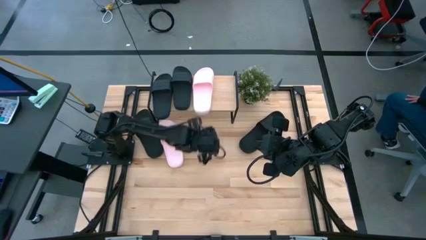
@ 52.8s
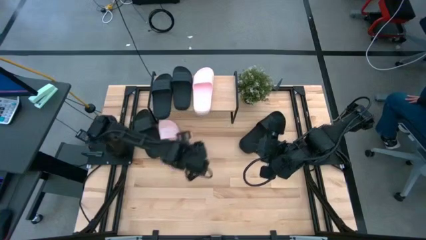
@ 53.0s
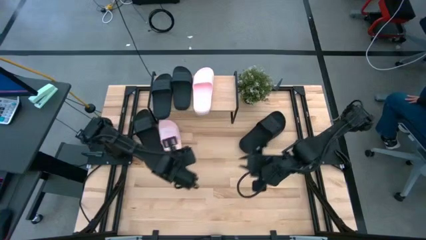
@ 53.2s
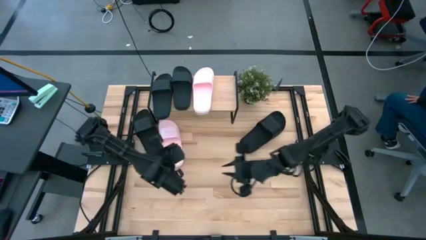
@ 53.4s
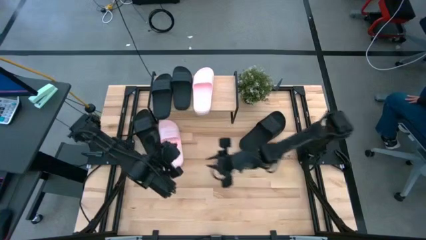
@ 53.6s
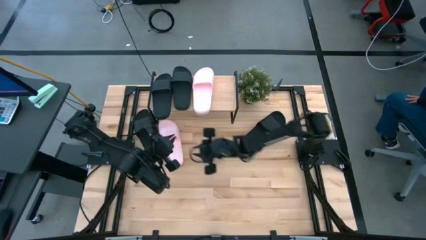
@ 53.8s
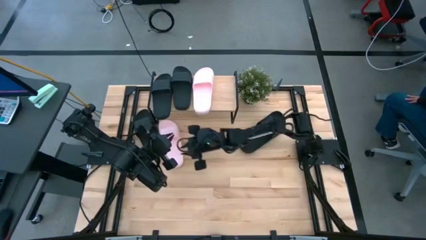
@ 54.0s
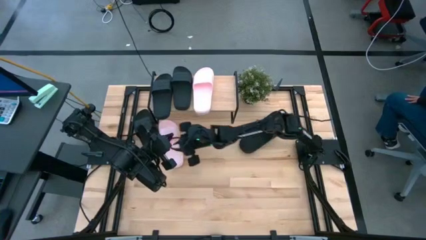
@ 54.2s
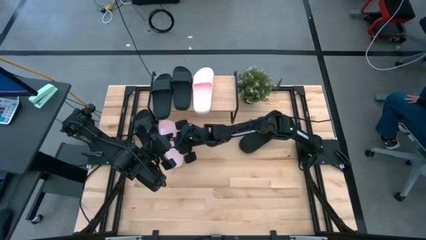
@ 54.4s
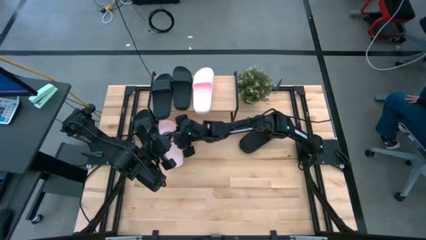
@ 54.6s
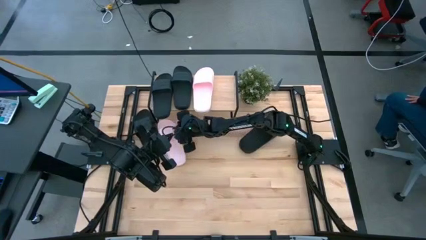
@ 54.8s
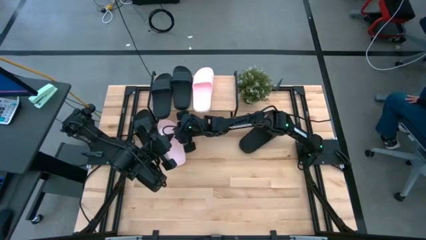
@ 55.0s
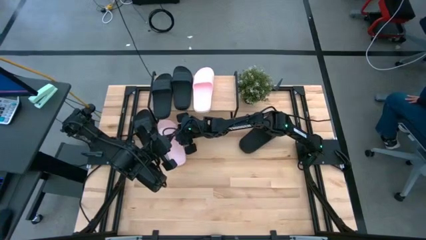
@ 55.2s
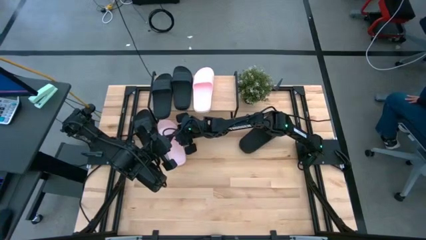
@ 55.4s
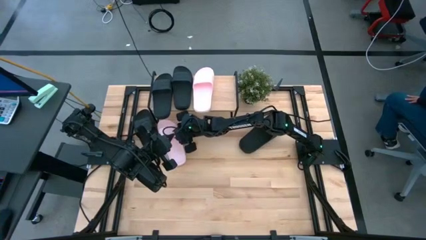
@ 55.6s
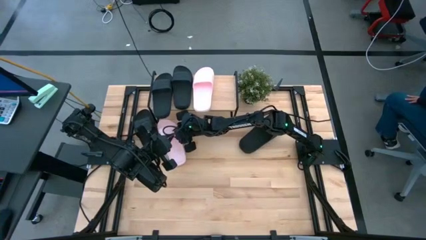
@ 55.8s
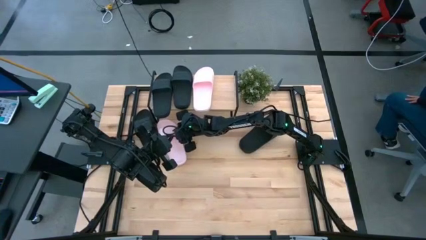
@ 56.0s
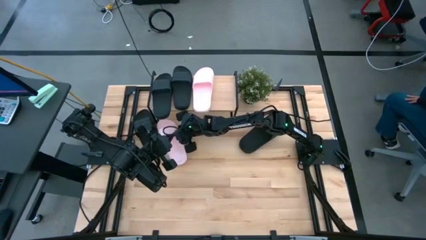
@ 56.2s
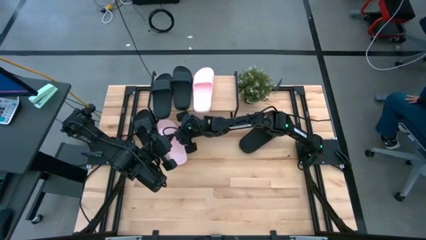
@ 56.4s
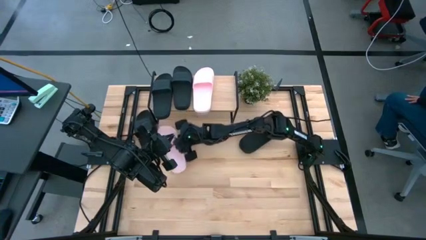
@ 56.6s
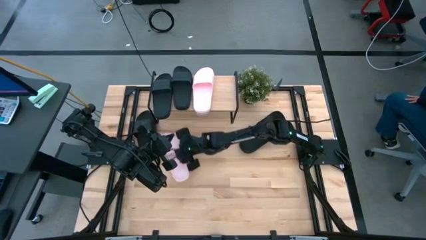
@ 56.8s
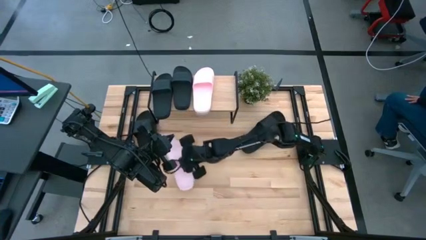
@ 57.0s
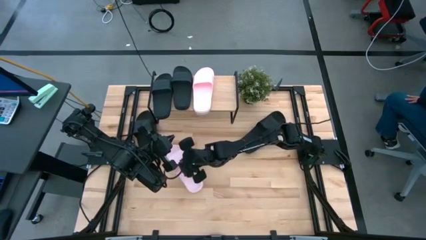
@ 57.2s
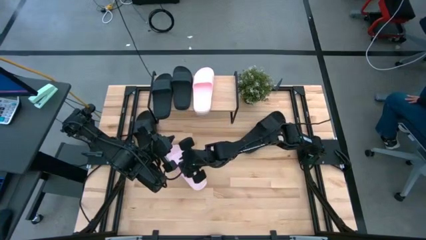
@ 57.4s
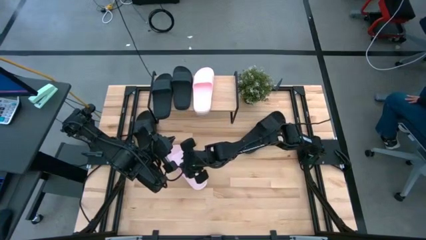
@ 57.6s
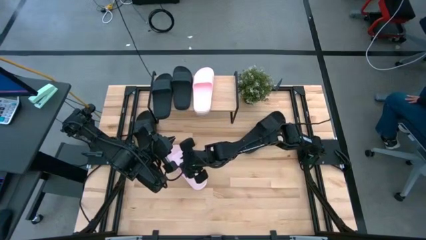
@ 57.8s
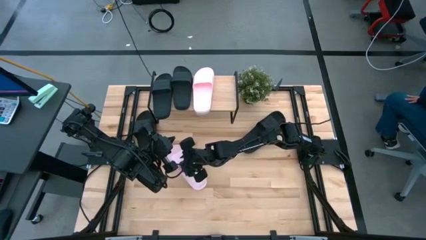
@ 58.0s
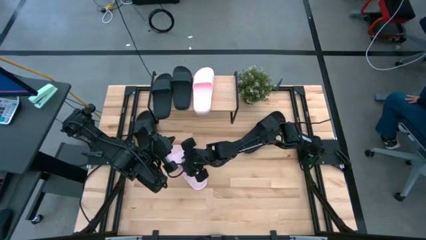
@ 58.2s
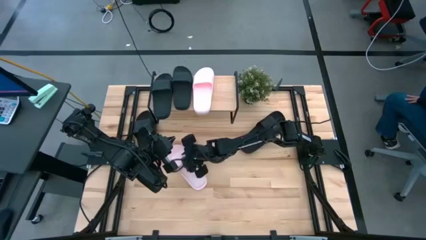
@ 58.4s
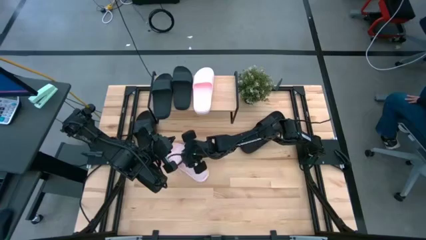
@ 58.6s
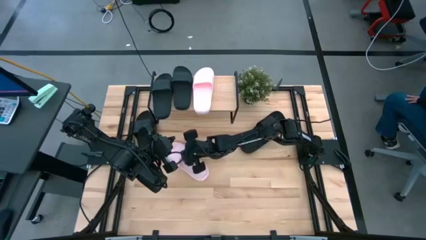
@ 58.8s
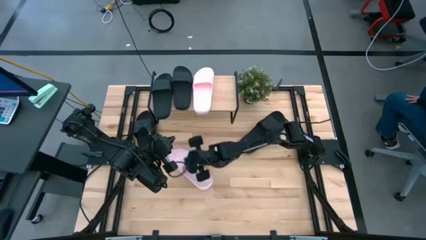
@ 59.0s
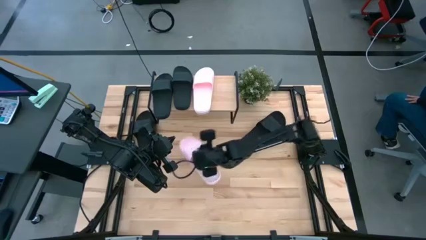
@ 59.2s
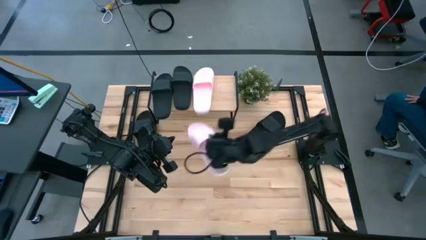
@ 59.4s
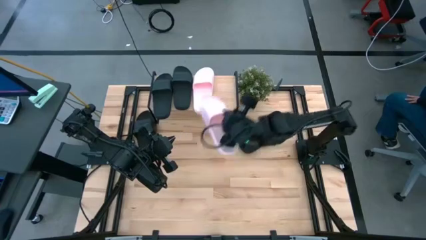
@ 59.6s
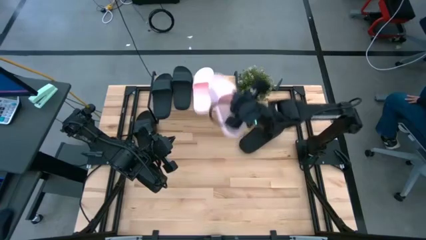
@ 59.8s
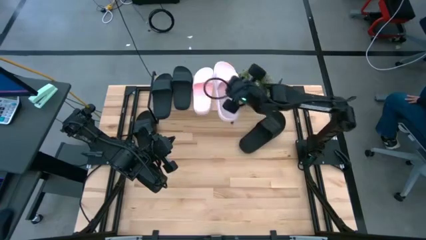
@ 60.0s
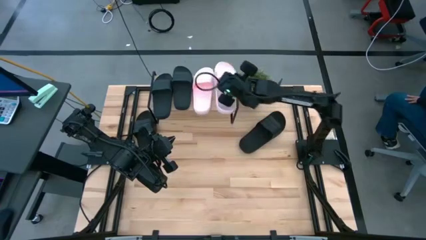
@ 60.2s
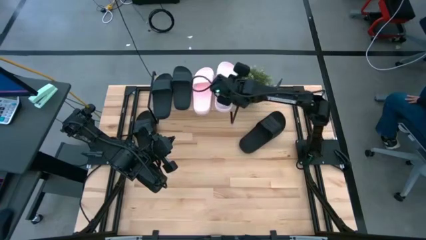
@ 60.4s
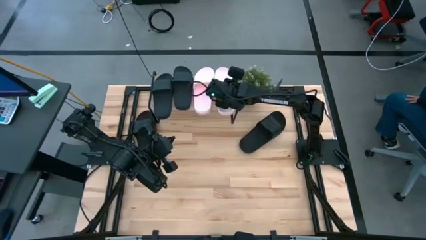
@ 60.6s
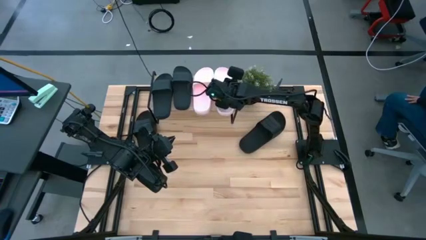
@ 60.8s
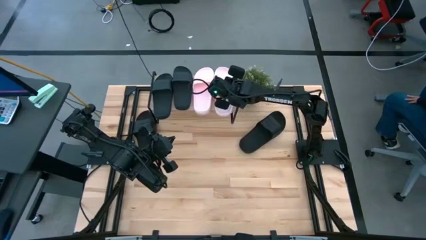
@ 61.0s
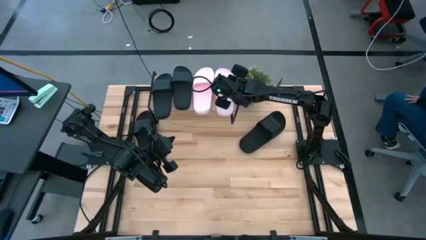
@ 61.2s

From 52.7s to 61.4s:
Task: Pick and place slides into the shelf
Put the pink slipper on the shelf

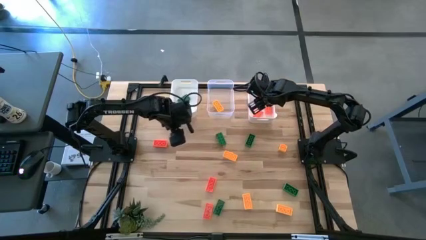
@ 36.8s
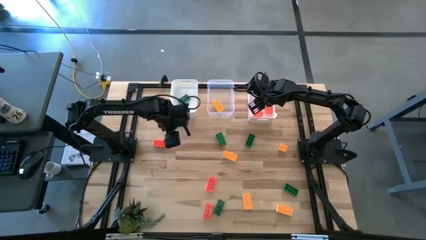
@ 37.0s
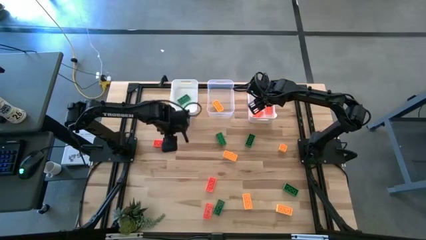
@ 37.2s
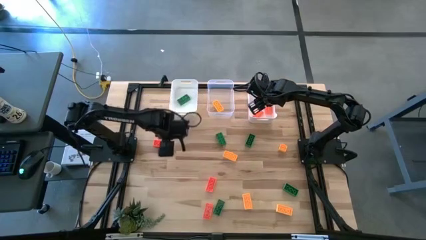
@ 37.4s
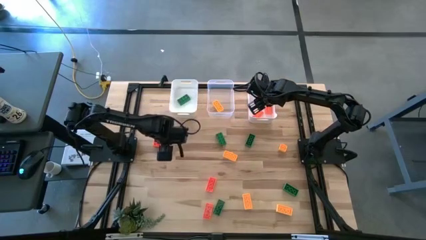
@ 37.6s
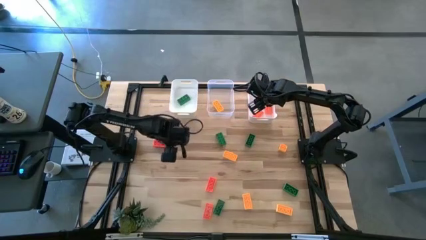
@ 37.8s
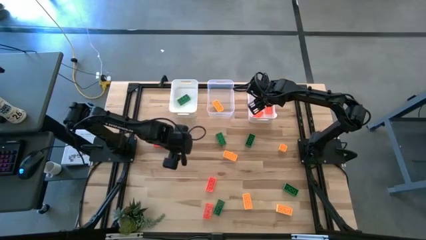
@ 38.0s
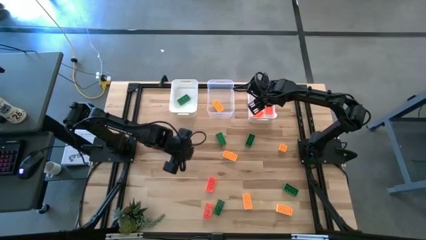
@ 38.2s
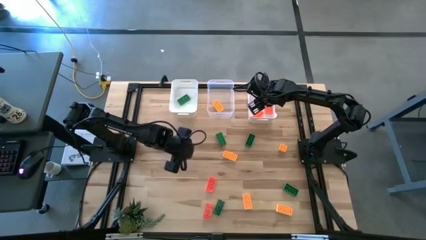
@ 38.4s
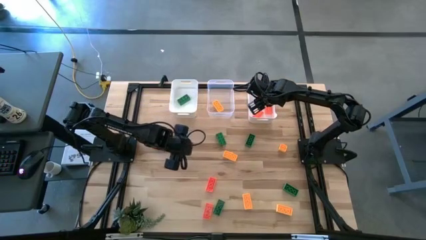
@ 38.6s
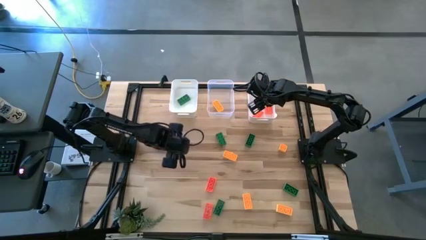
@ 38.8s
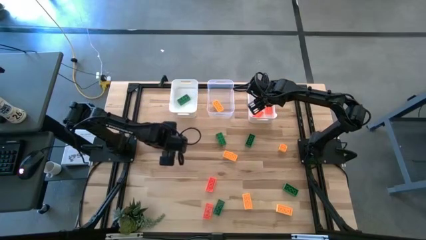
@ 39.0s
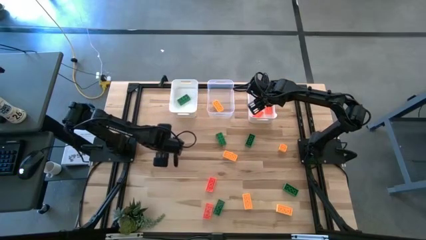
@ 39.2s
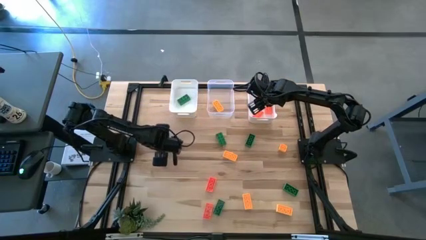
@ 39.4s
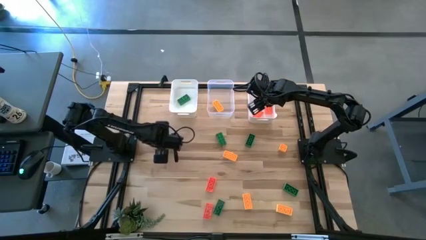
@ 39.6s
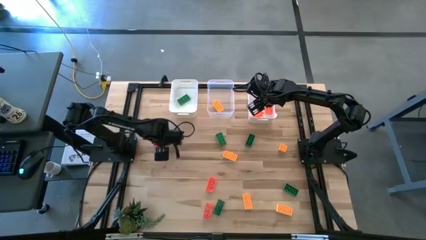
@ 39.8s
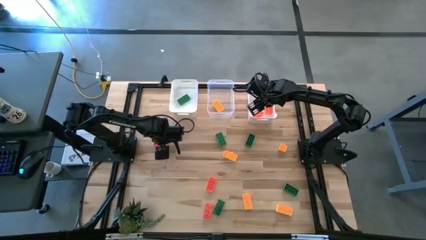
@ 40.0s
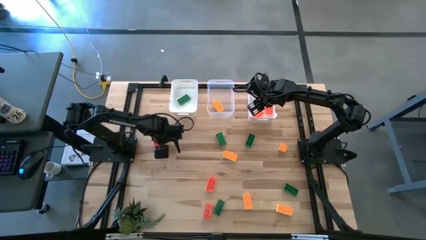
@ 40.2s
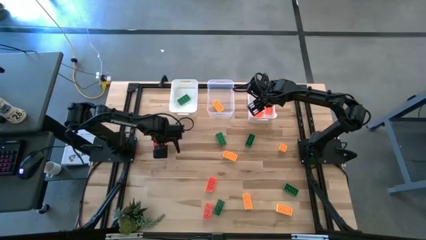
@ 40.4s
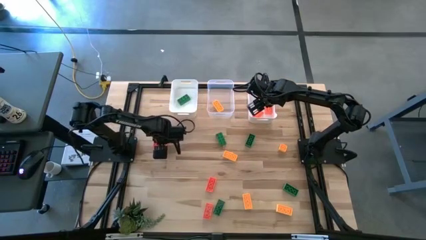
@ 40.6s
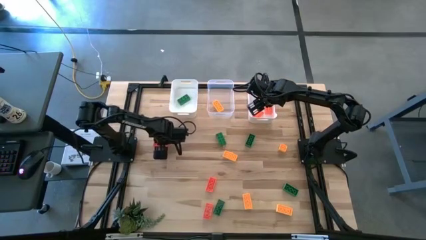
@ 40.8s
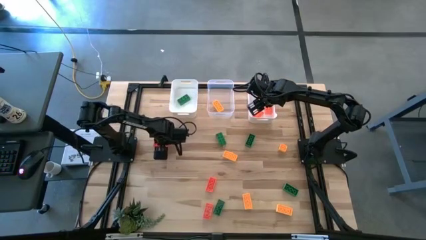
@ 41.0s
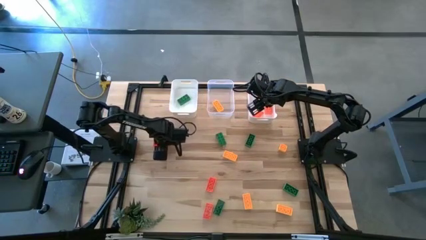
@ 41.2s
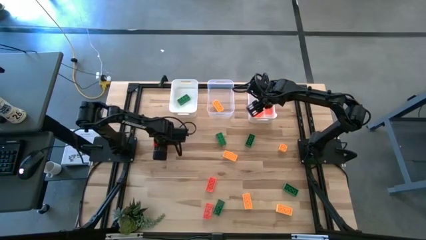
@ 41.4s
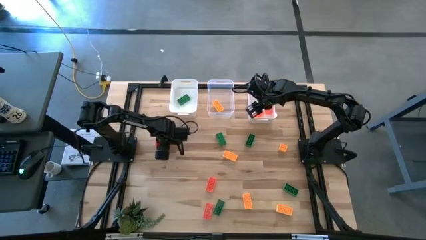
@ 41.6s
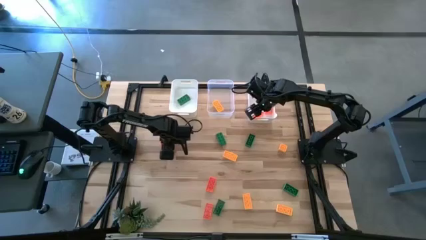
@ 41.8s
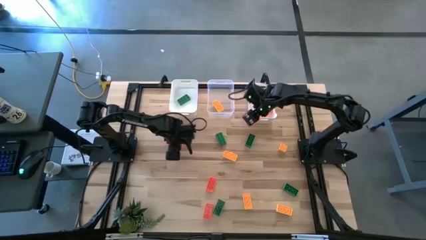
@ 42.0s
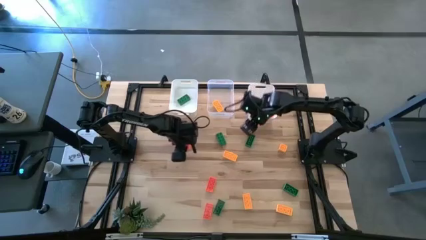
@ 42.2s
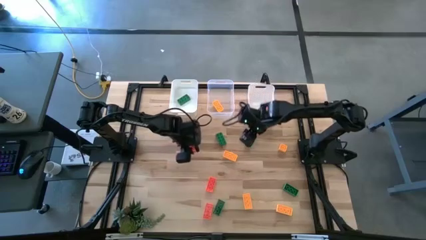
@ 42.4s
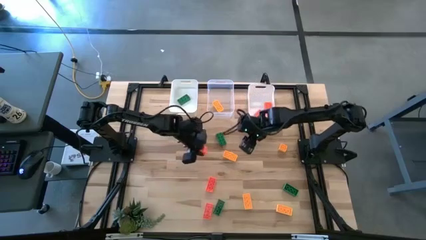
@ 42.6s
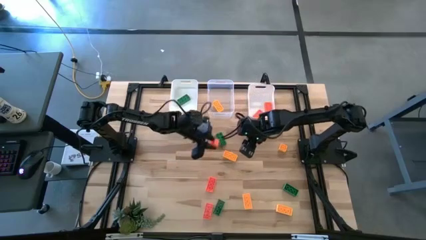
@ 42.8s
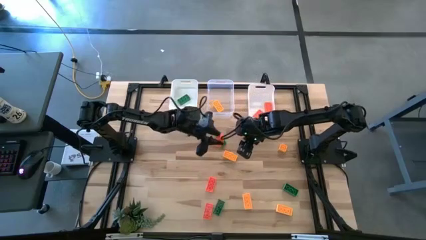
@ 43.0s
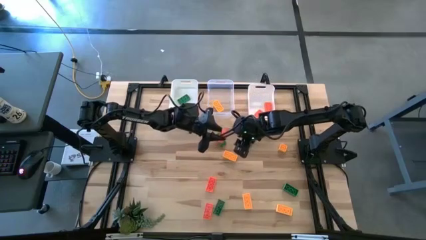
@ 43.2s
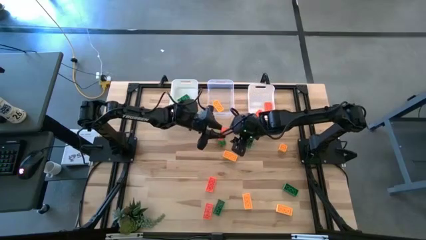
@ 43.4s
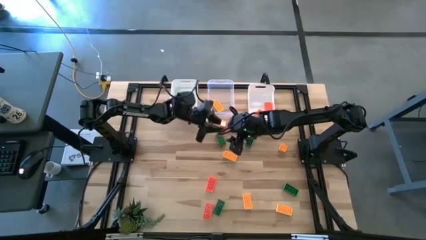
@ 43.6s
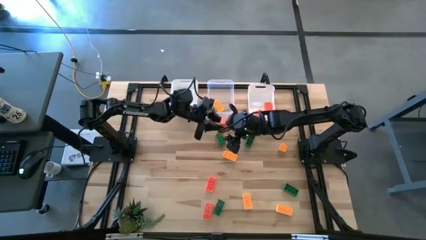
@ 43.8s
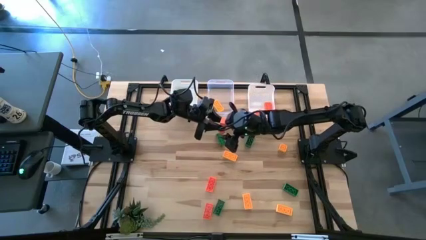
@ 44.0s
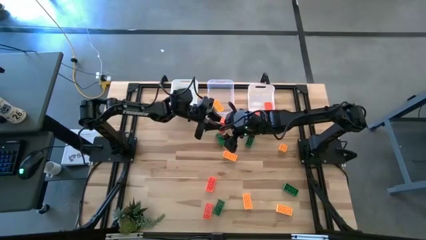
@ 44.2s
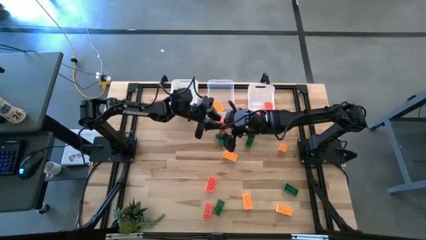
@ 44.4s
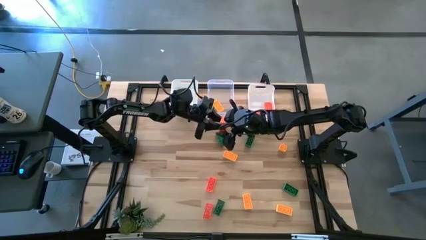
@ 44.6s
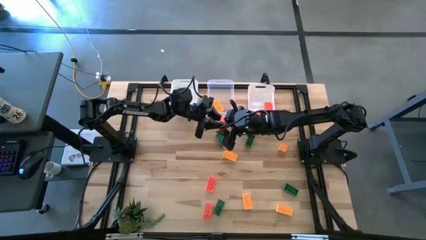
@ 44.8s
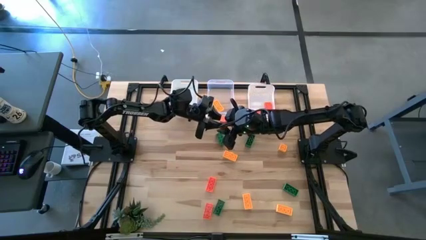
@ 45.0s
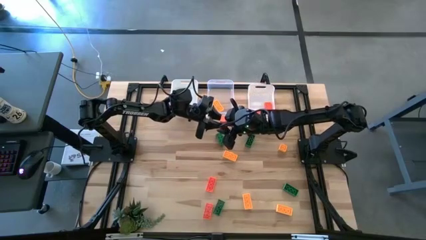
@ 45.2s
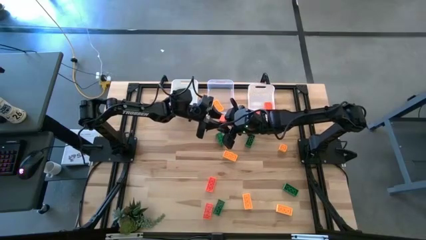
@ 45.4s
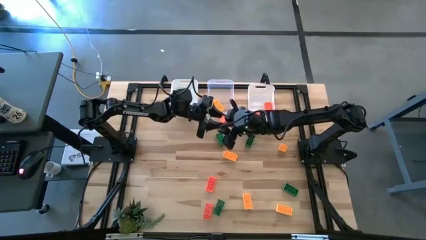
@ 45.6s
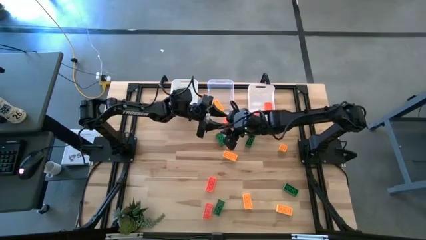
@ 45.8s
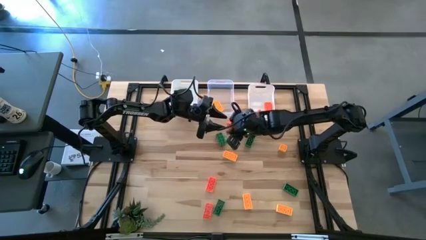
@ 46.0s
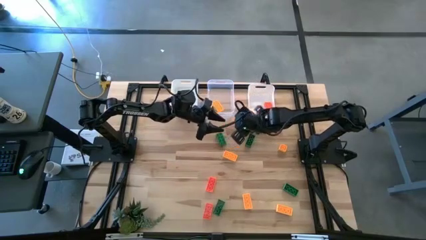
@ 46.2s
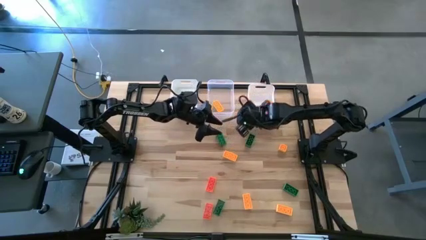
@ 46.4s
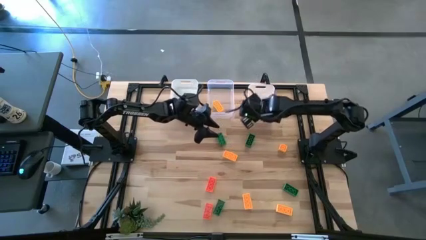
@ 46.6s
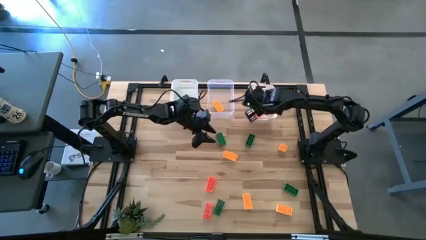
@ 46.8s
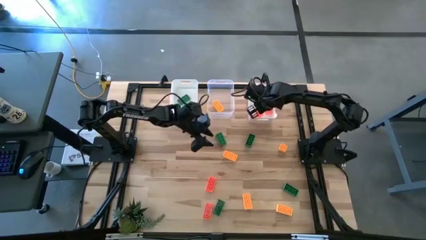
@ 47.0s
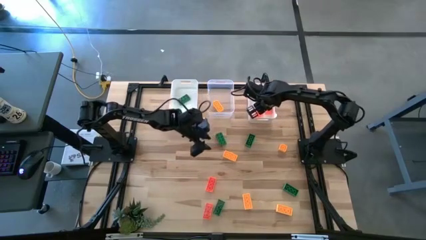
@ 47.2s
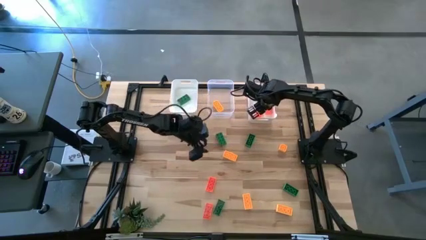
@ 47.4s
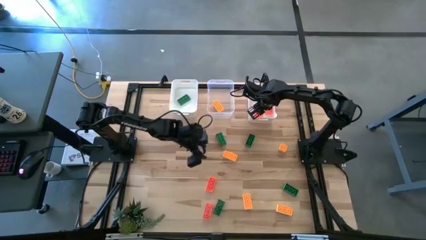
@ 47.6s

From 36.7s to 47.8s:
Task: Sort & place blocks by color
Put the orange game piece into the right white bin
